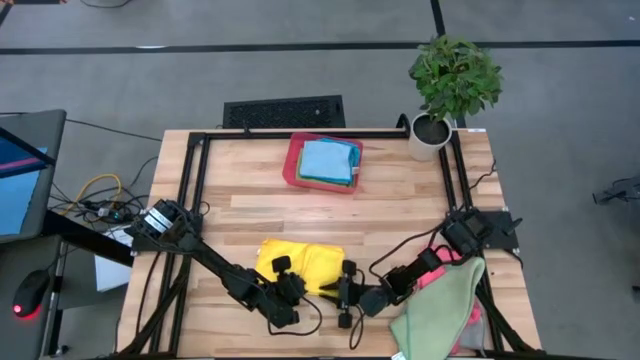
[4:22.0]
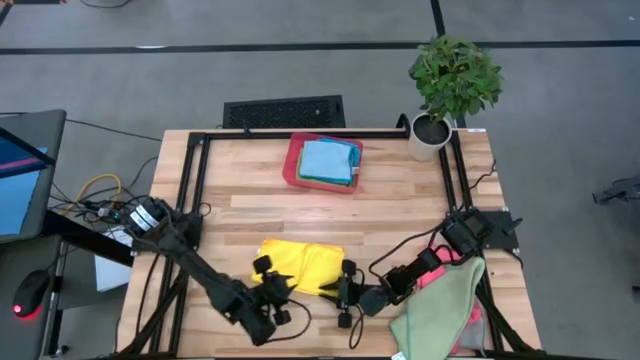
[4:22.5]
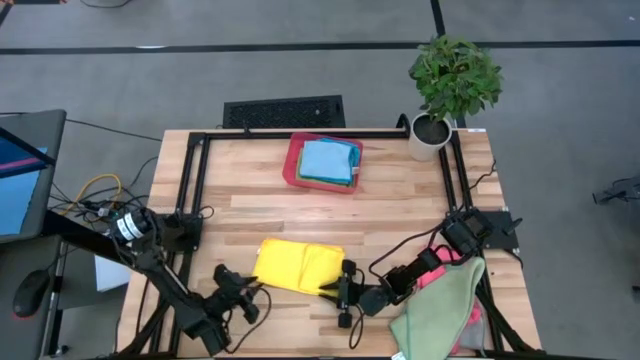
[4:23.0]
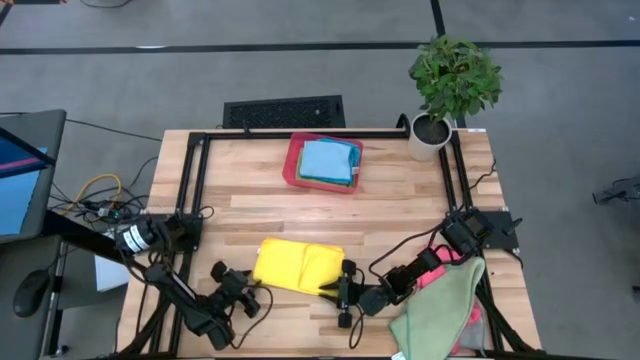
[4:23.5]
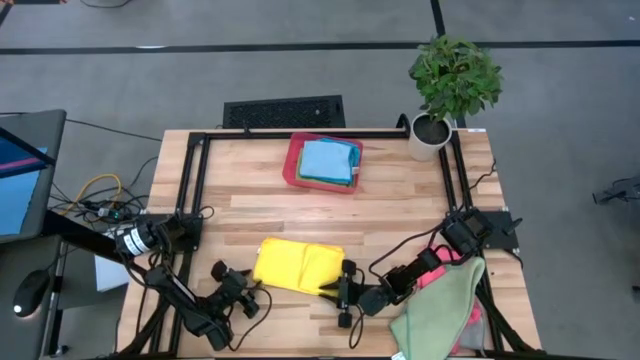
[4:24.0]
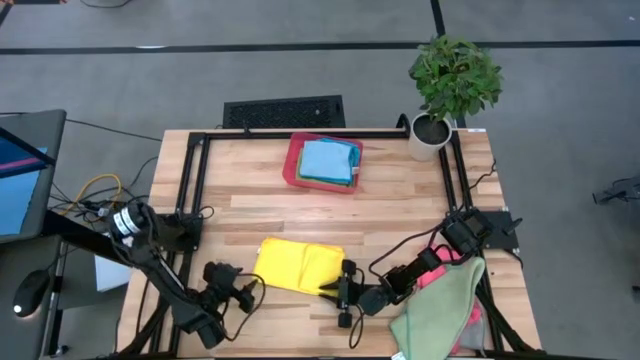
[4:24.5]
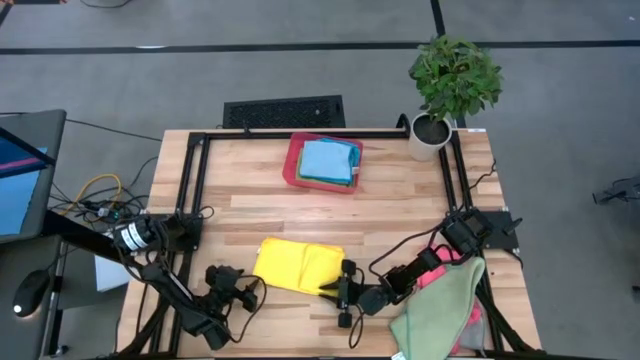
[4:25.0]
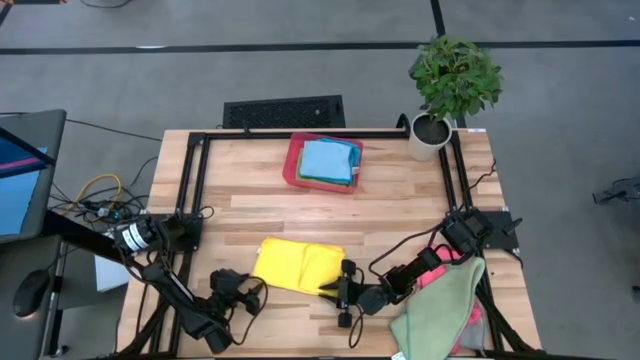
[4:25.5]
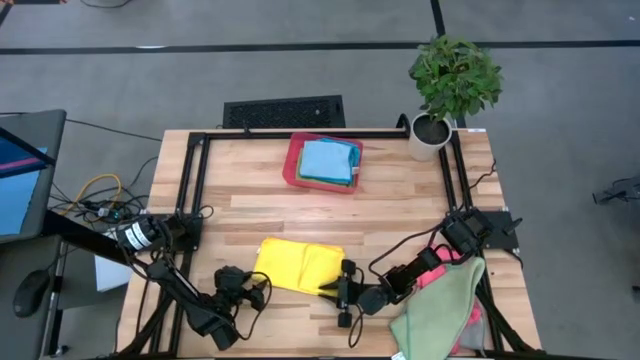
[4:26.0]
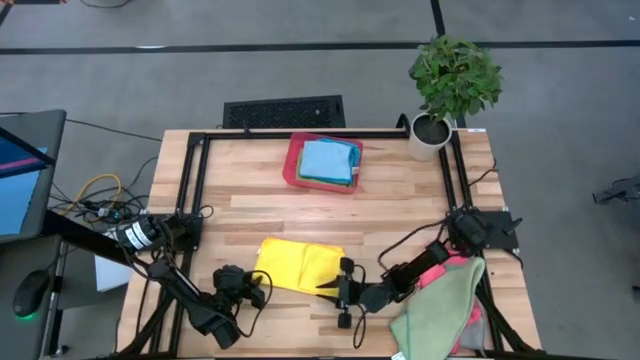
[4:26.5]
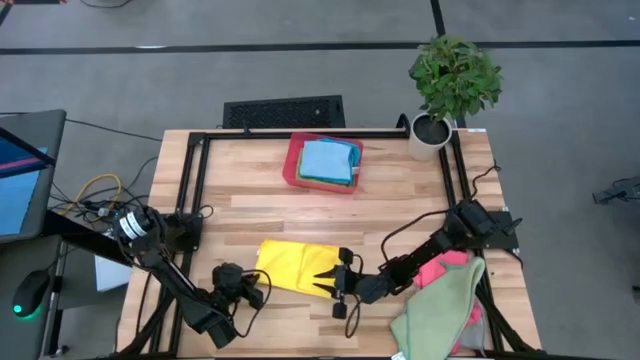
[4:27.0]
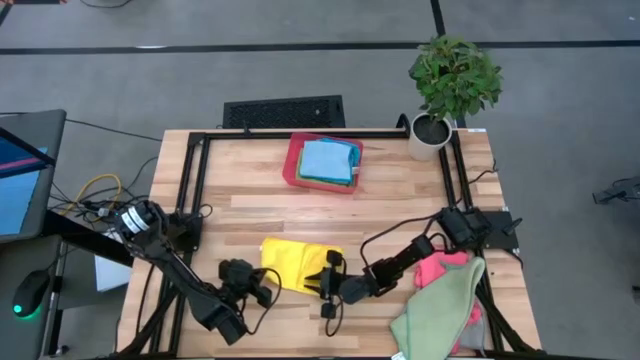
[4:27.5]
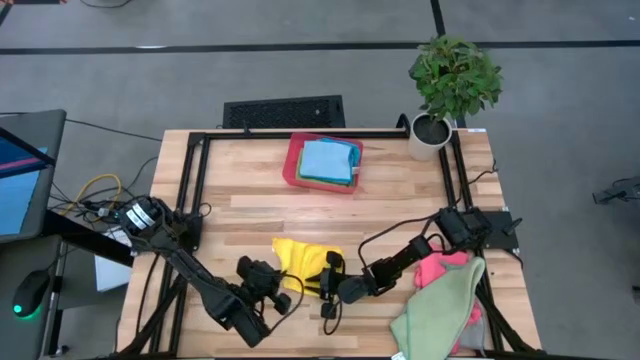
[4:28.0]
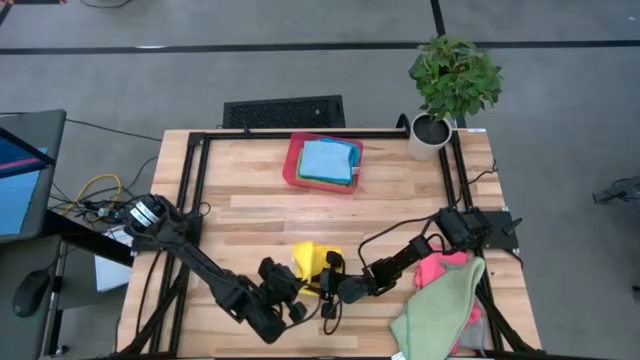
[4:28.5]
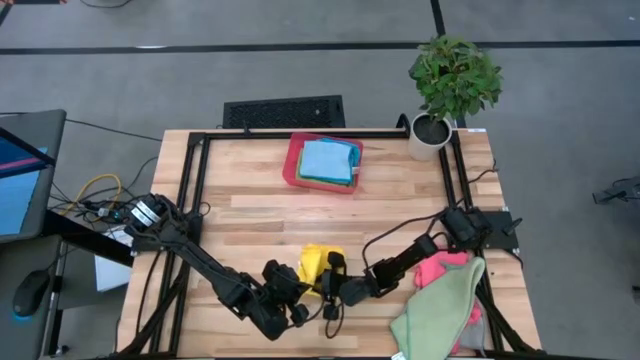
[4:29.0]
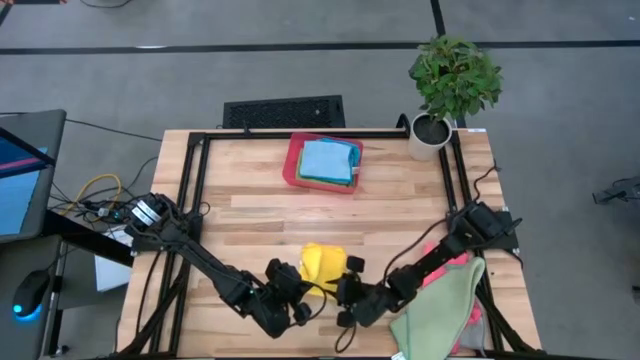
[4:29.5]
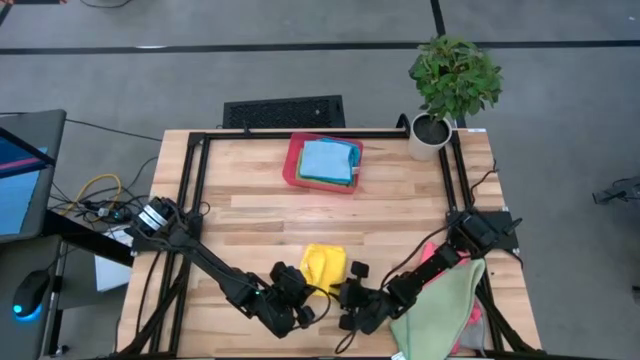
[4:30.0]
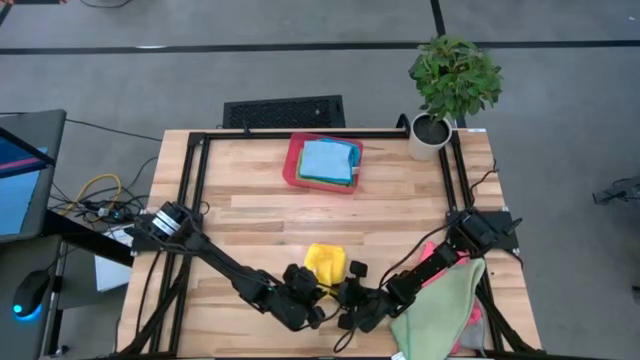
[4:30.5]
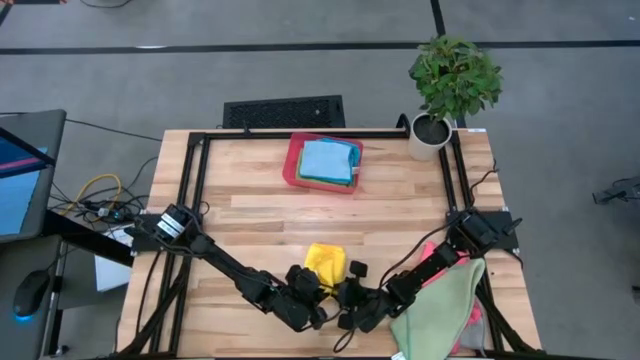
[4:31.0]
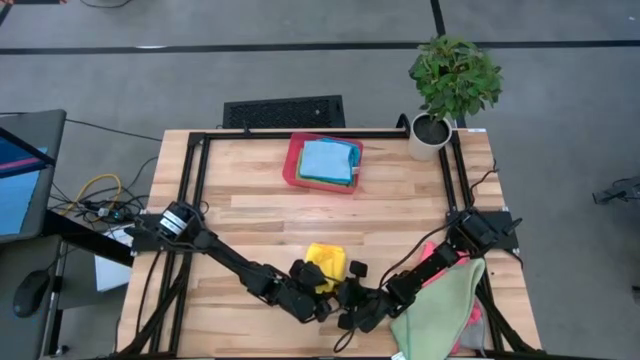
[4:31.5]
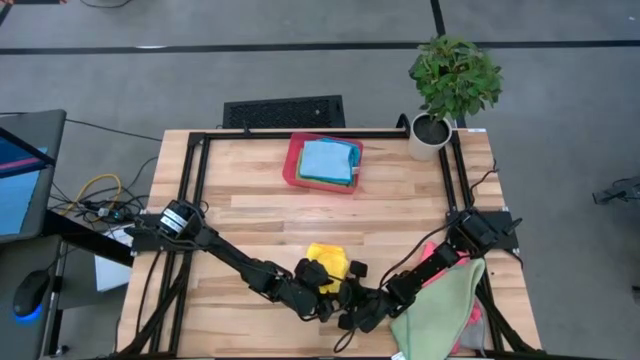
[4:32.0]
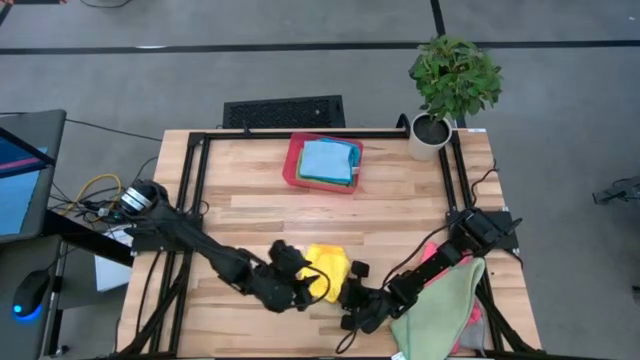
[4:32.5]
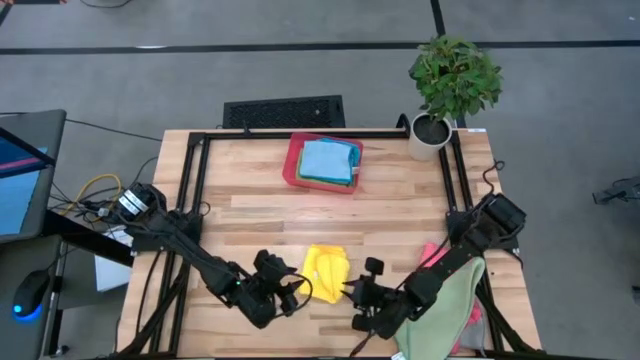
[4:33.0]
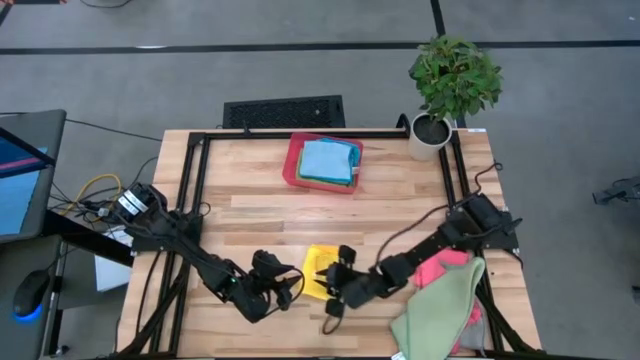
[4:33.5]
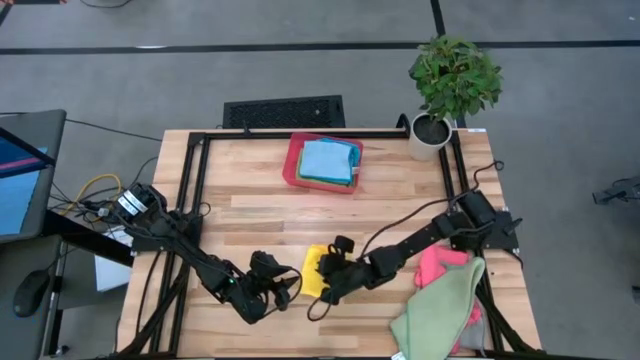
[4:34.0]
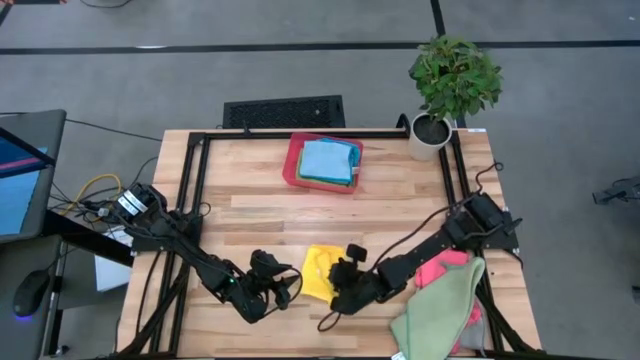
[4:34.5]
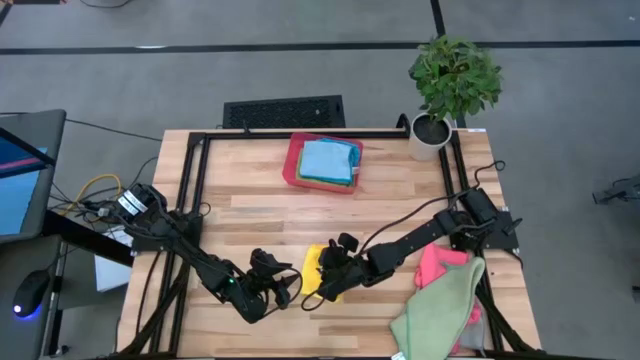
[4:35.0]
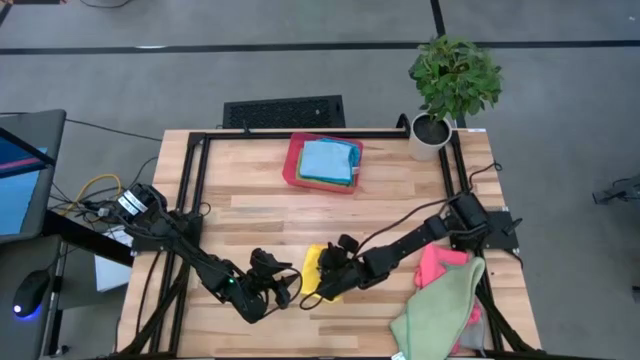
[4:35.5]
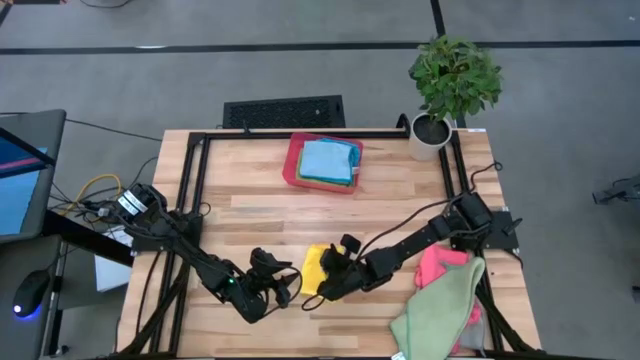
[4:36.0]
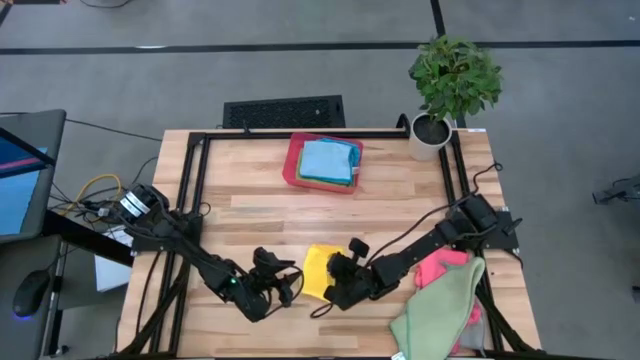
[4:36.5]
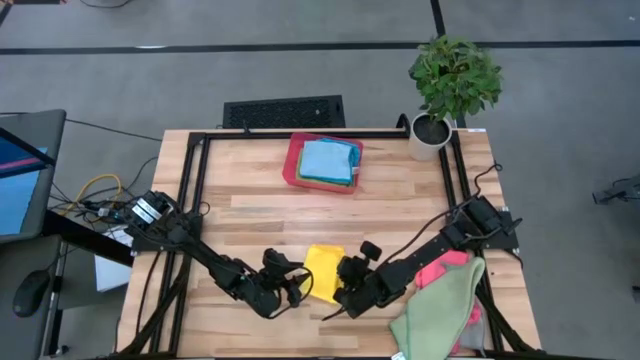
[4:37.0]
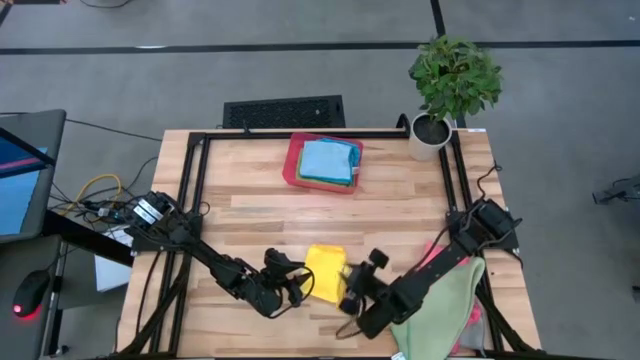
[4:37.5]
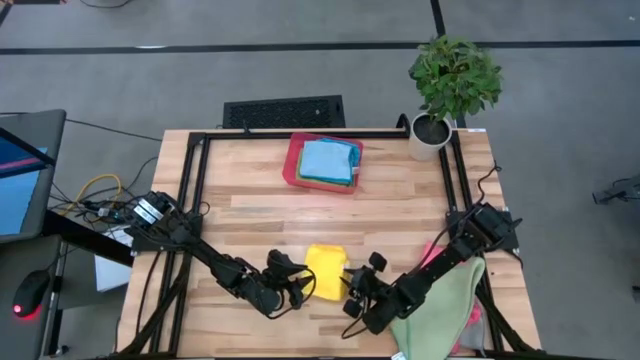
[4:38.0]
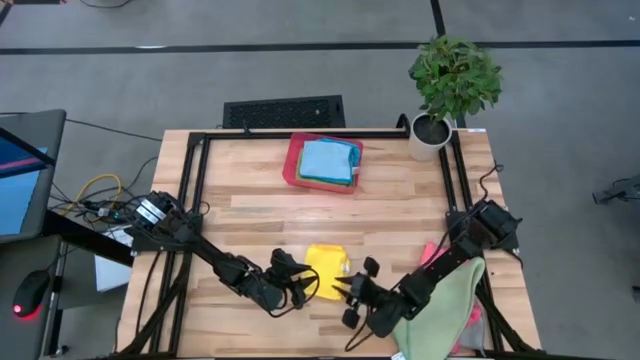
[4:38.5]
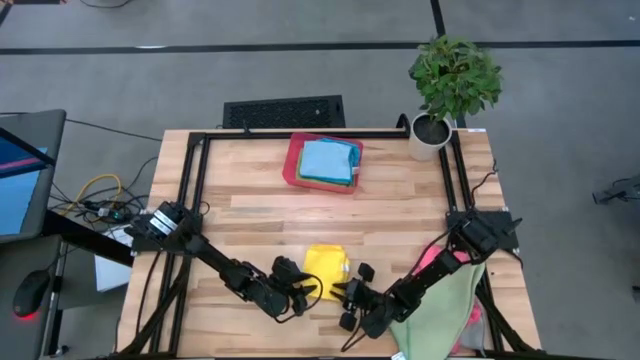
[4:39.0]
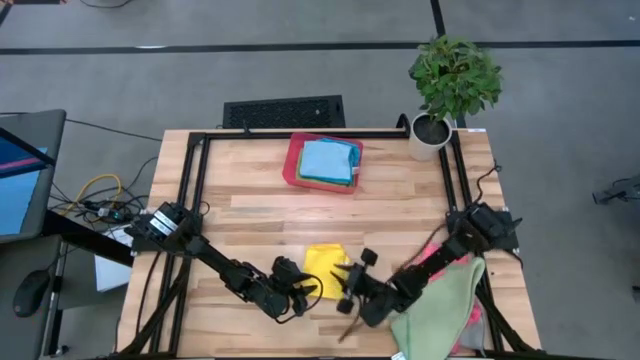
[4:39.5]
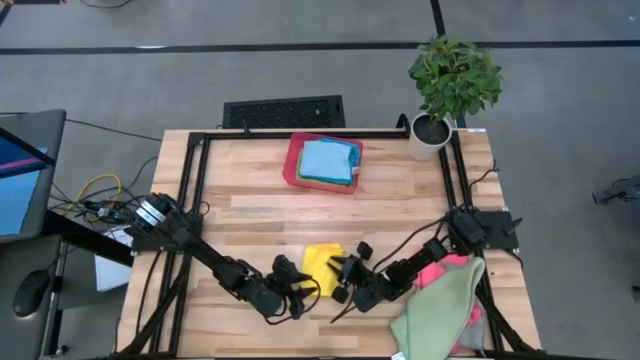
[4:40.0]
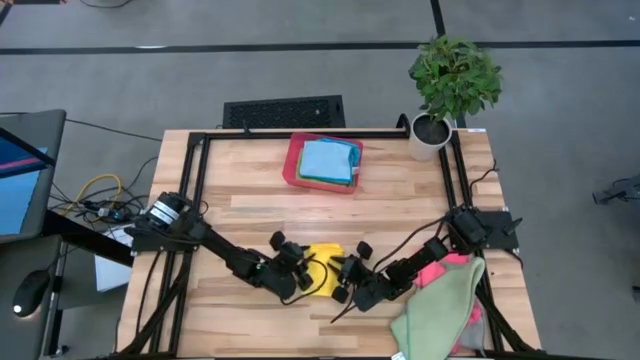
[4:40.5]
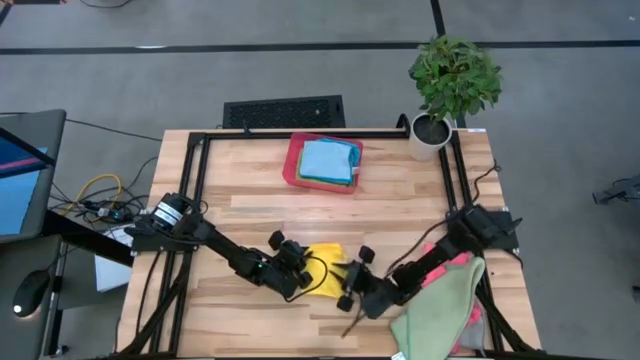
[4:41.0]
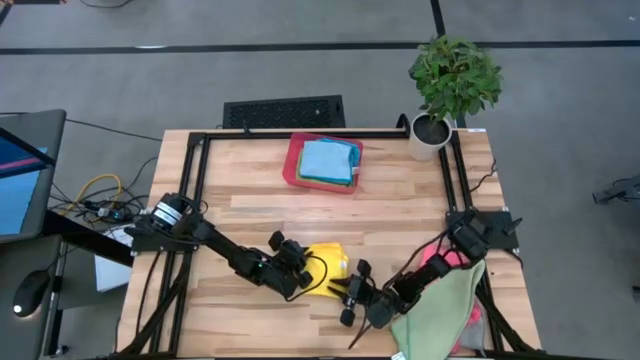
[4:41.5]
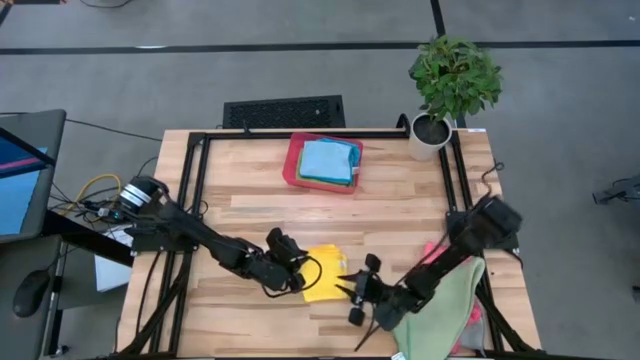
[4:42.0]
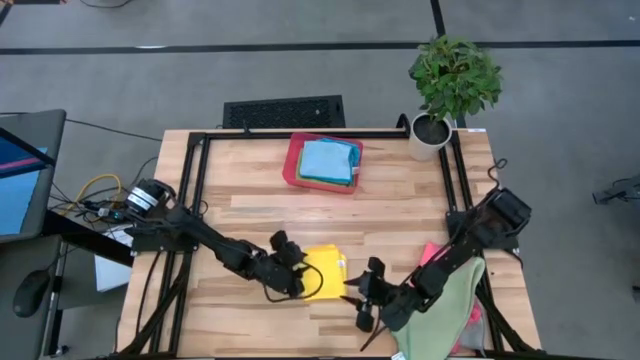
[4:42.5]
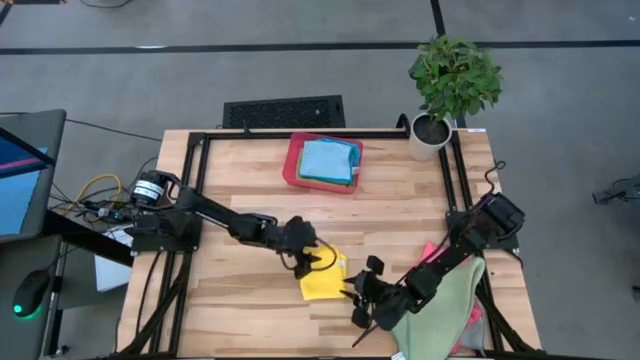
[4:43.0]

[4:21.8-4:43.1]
Task: Fold microfiber towels
Fold the yellow microfiber cloth
